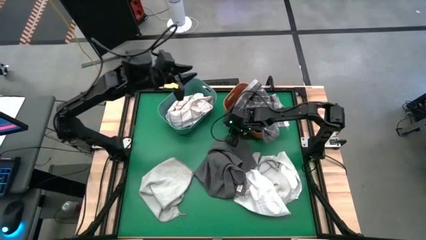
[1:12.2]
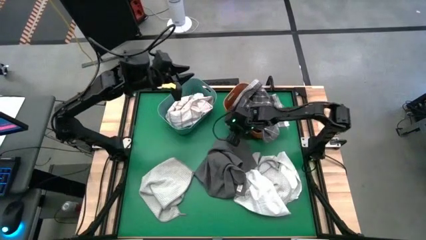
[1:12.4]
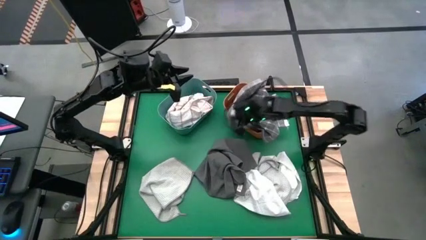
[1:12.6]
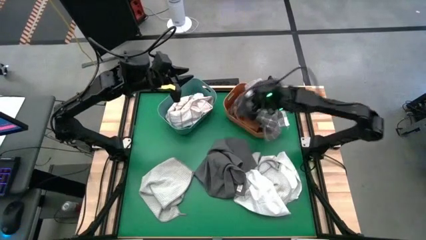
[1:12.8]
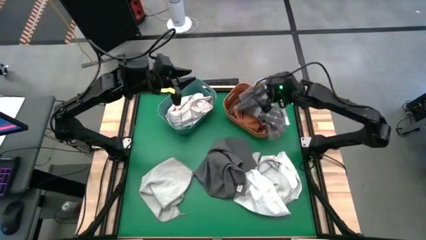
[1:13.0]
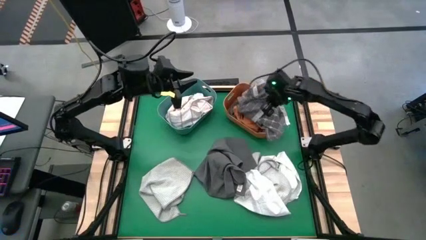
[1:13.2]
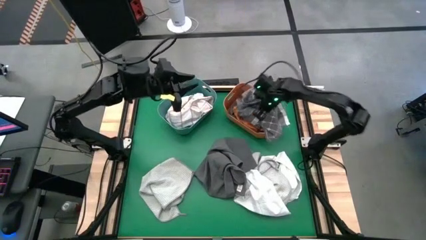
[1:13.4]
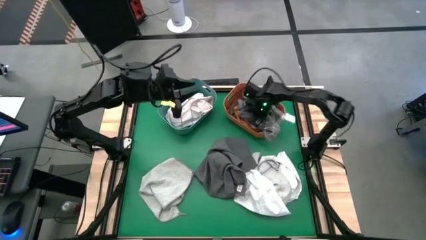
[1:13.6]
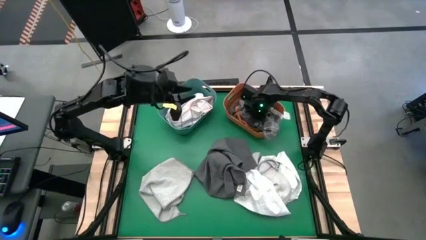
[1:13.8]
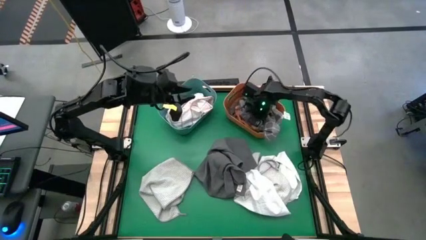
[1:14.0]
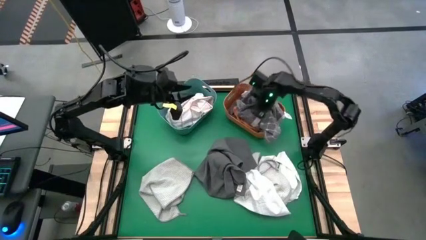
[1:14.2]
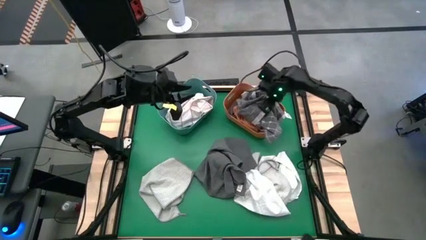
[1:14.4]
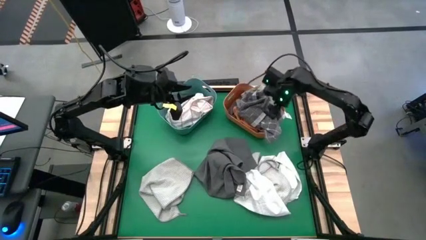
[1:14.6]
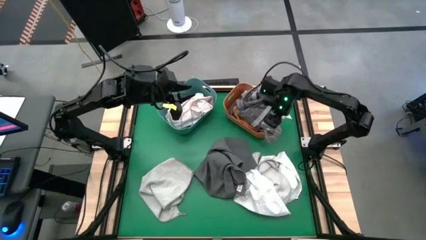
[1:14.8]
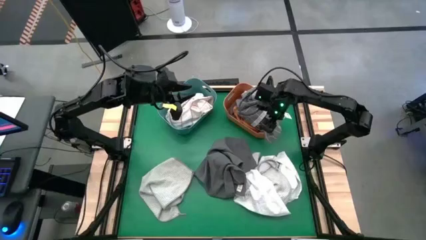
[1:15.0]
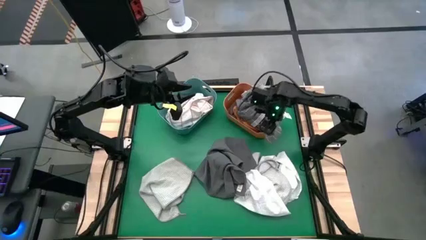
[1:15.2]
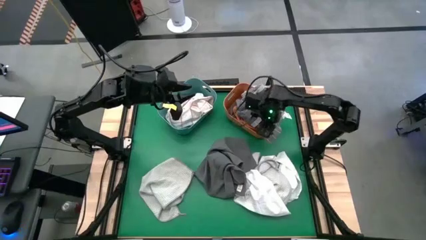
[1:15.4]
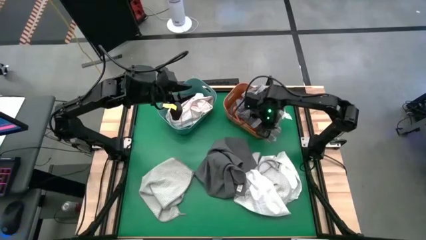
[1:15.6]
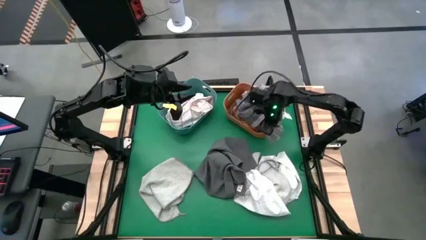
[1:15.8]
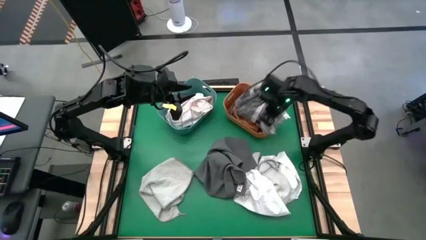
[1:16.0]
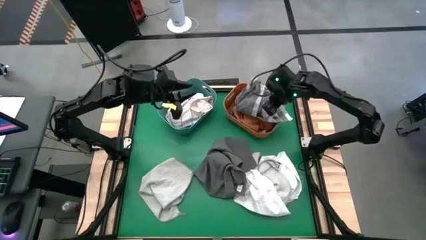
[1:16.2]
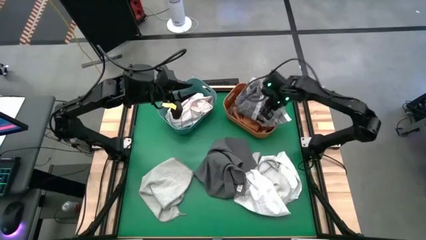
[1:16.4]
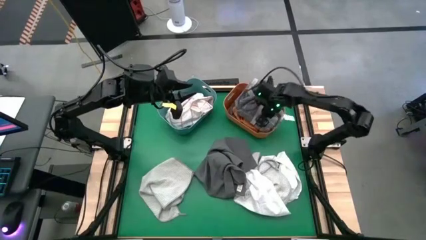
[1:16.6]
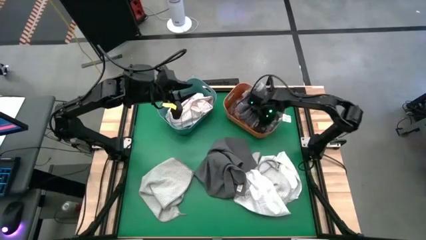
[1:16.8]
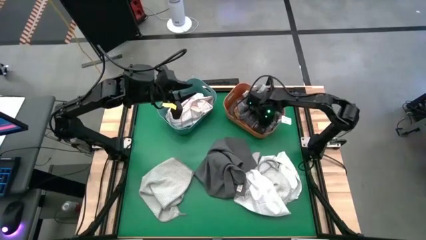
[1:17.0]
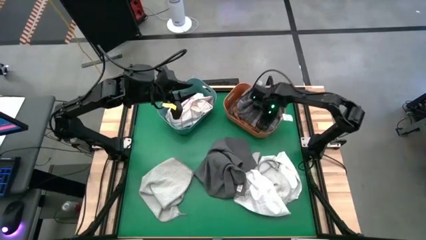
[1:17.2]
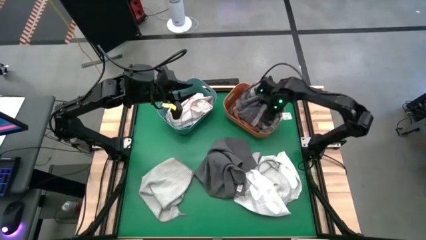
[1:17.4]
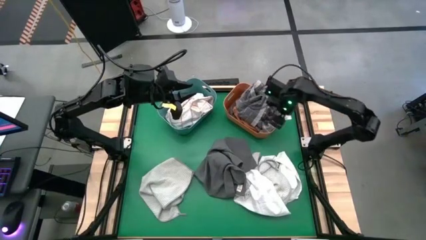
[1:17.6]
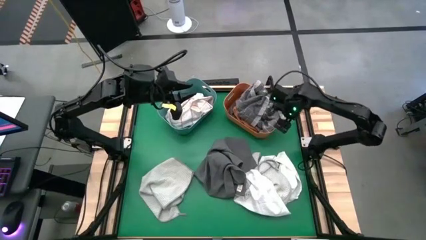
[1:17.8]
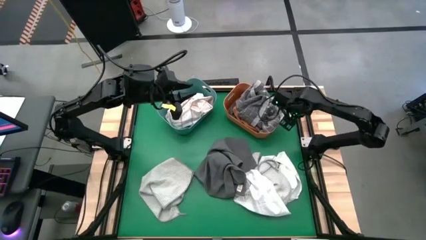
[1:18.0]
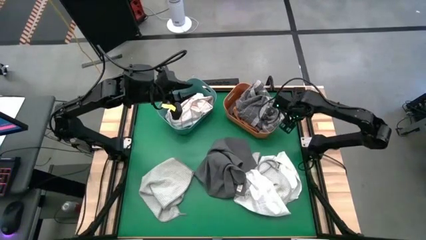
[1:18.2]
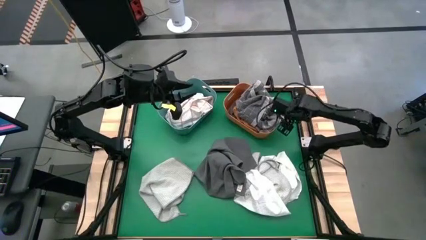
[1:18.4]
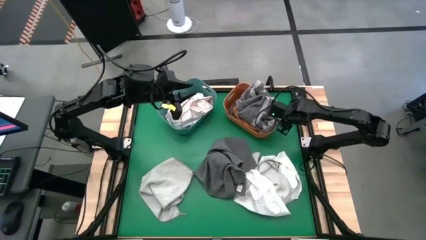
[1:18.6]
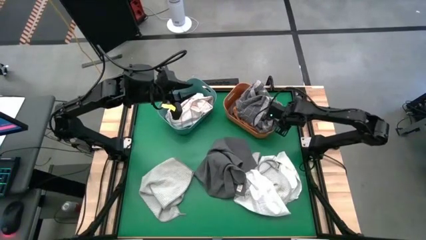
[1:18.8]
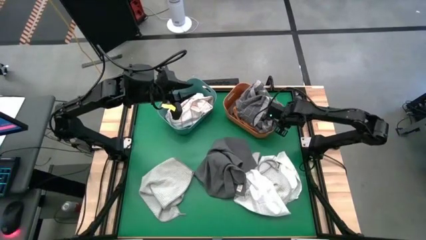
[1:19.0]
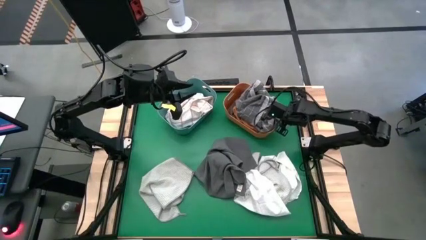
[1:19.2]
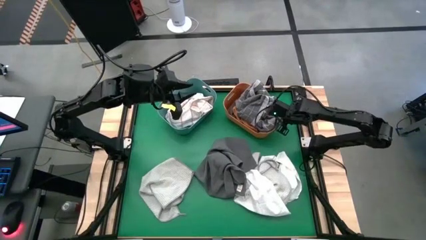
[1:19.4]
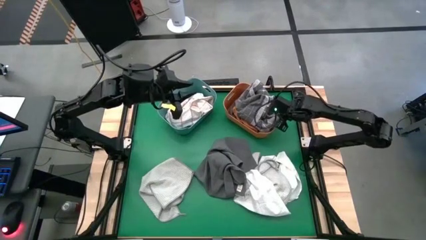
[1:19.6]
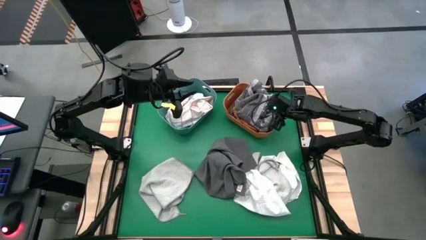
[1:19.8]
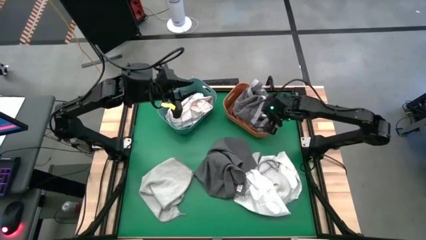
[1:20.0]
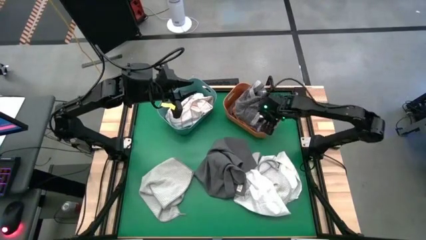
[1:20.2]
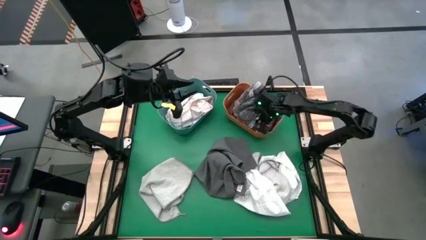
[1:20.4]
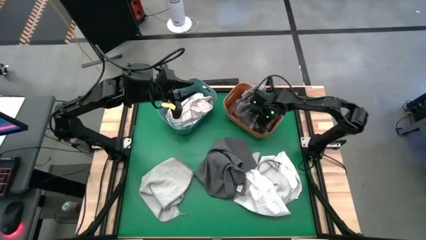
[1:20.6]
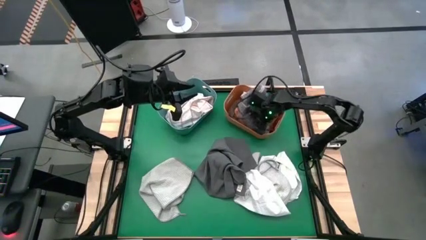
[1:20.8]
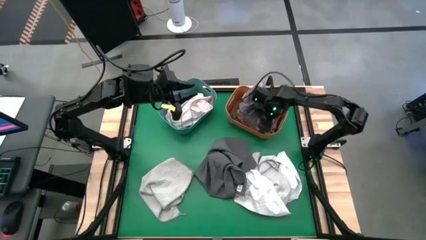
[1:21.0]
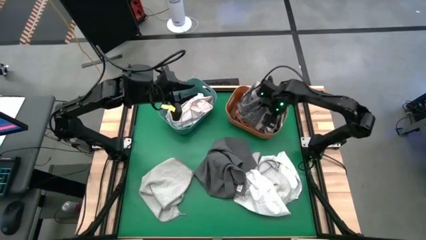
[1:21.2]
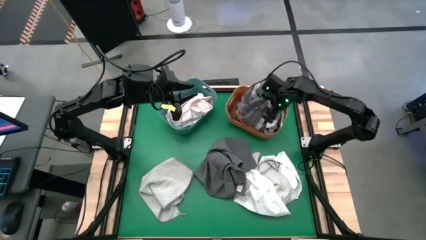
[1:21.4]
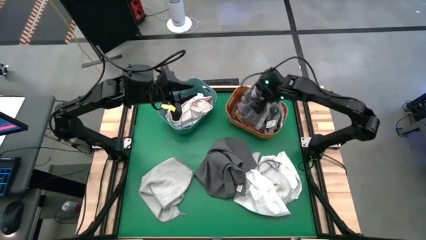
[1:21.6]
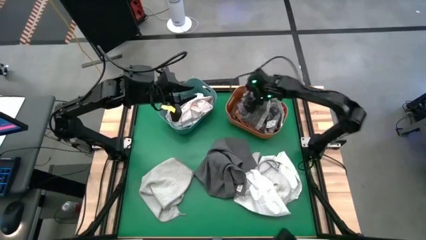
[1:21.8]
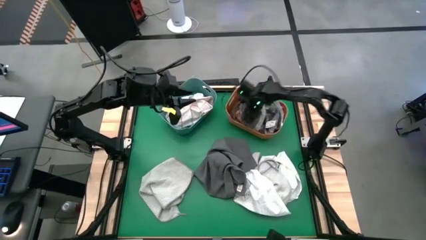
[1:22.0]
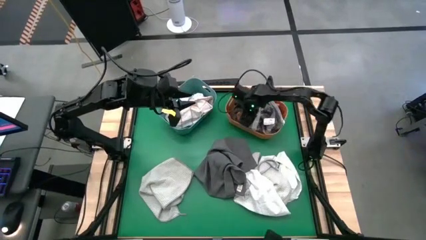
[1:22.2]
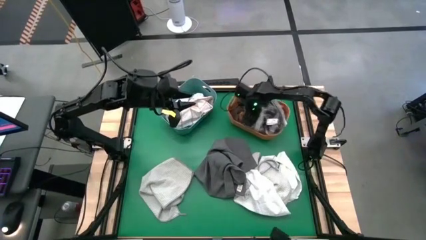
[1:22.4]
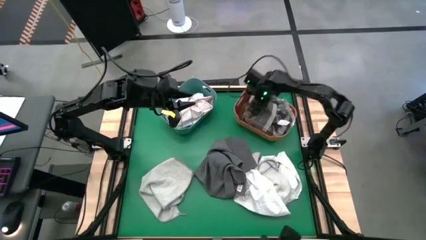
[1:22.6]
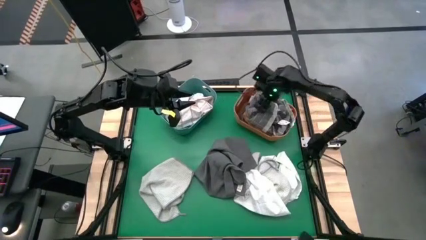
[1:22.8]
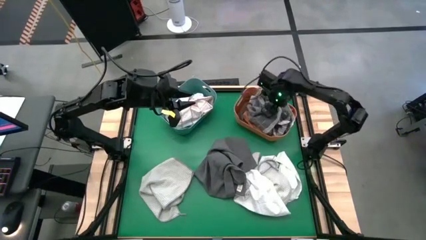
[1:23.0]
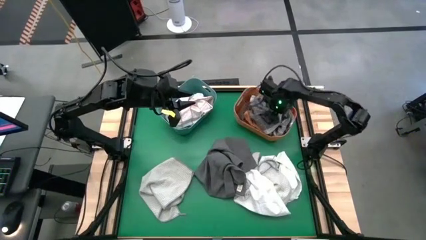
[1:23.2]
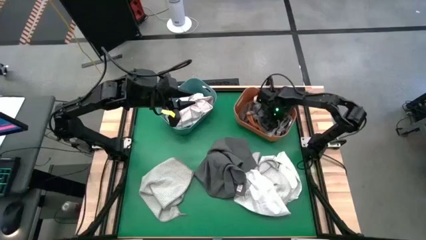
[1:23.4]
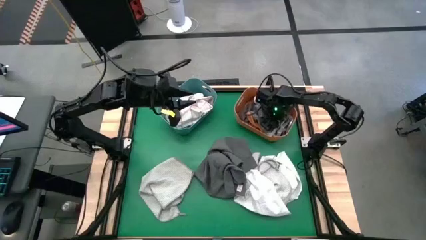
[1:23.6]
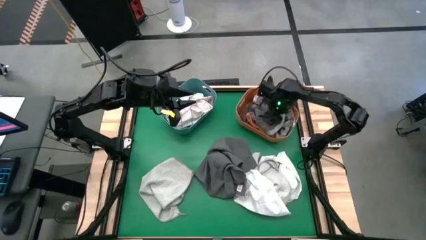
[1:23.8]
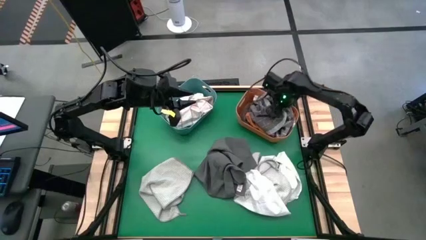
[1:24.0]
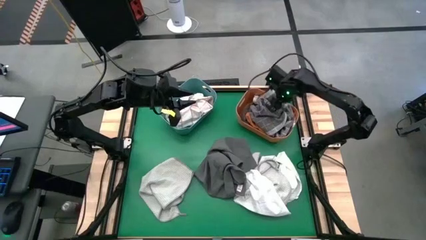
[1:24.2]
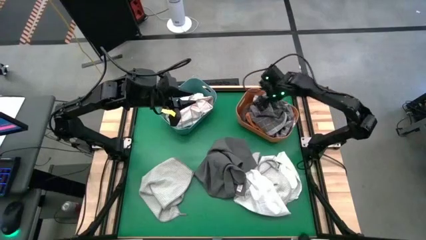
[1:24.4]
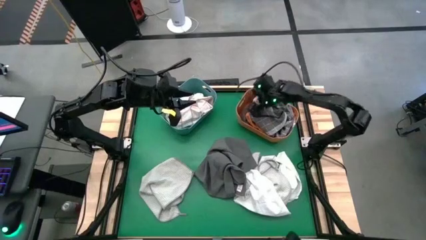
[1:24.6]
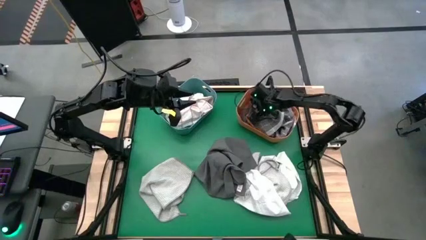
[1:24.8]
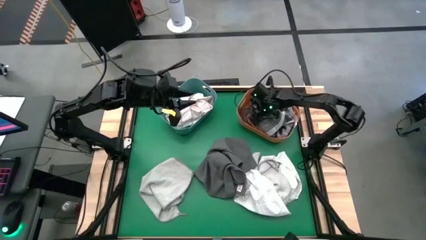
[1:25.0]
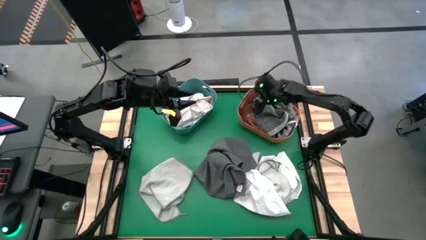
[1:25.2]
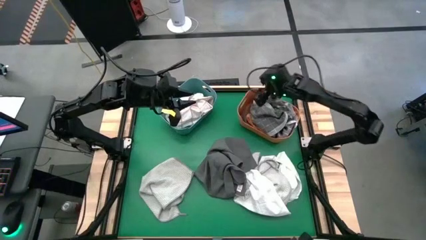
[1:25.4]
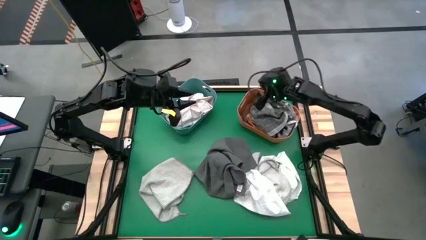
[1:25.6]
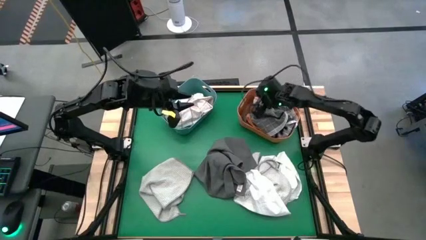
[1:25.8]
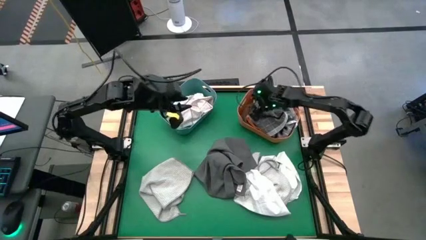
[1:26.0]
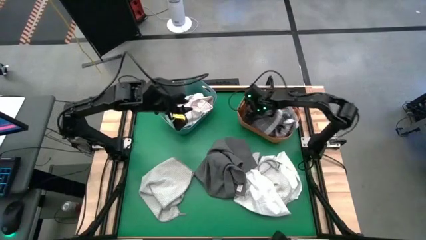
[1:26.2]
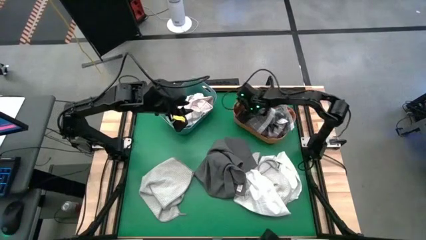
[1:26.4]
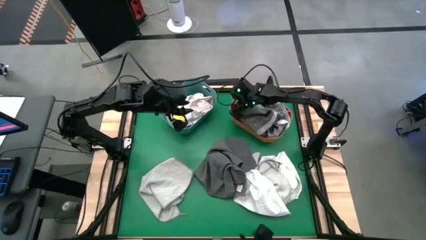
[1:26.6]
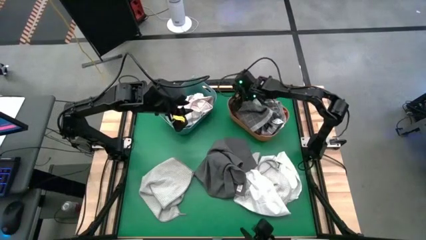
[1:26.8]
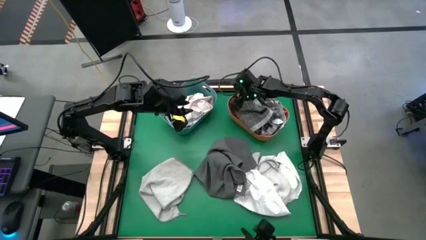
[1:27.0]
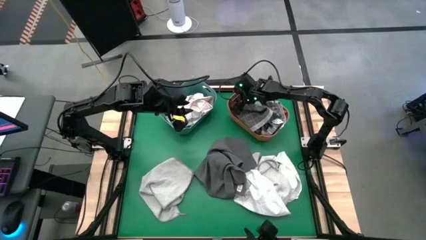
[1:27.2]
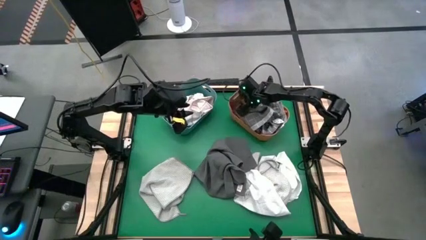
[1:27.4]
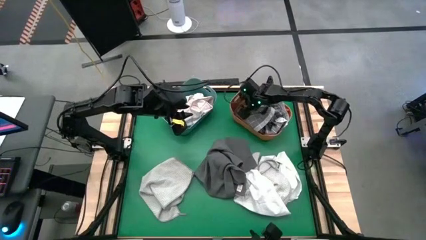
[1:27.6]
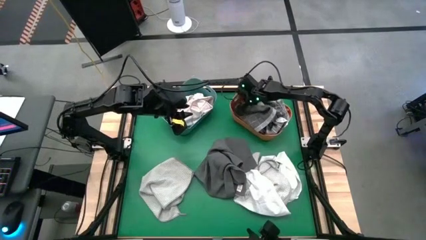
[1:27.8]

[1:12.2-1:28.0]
Task: Sort towels by color in basket
Put the gray patterned towel into the orange bin
